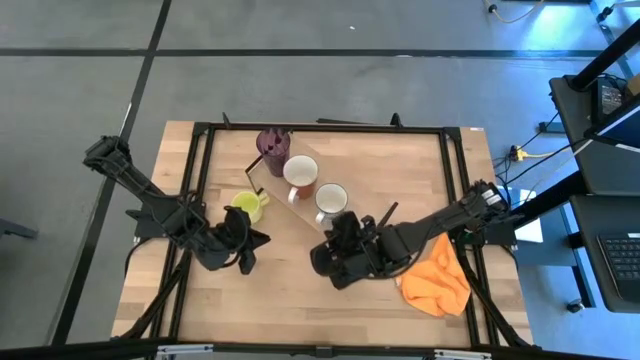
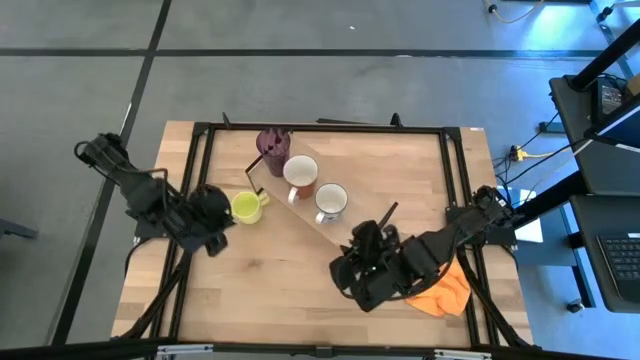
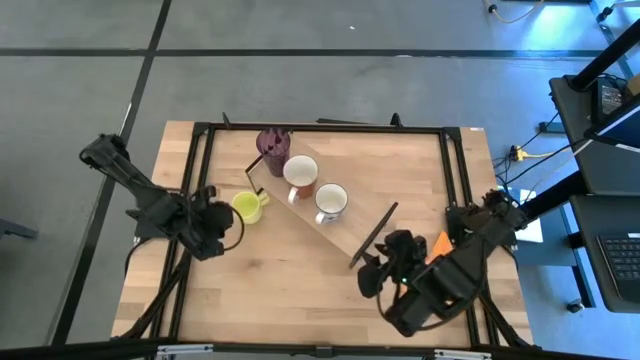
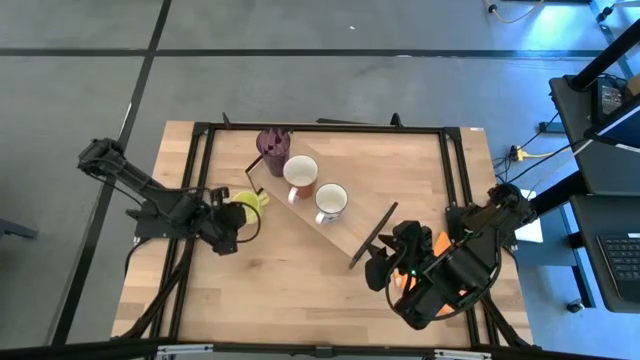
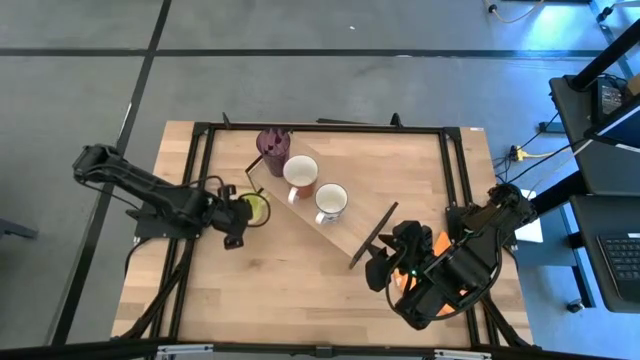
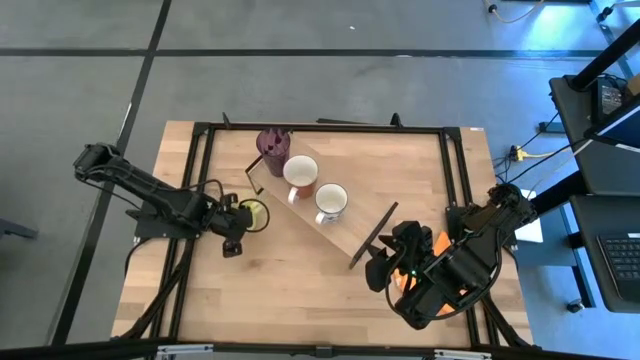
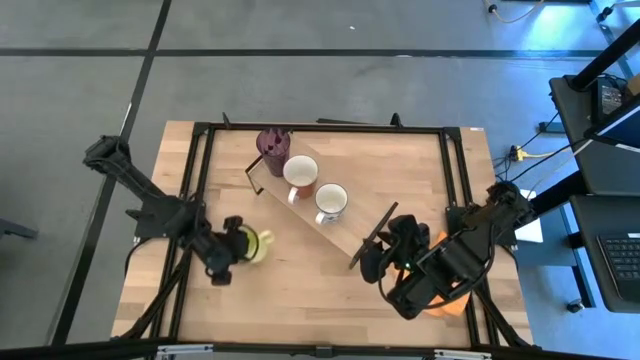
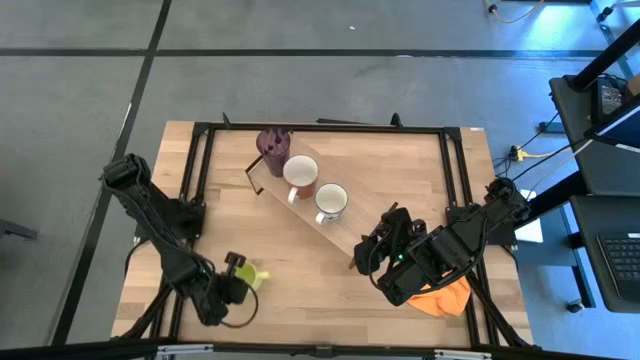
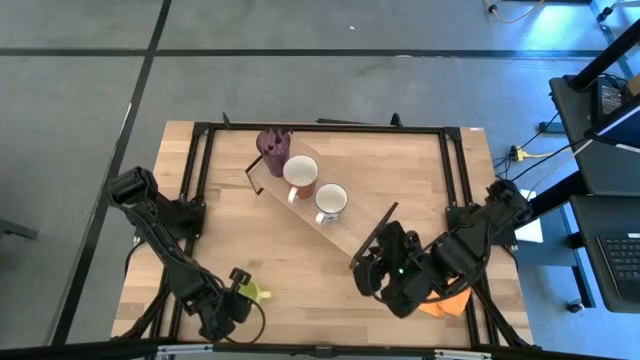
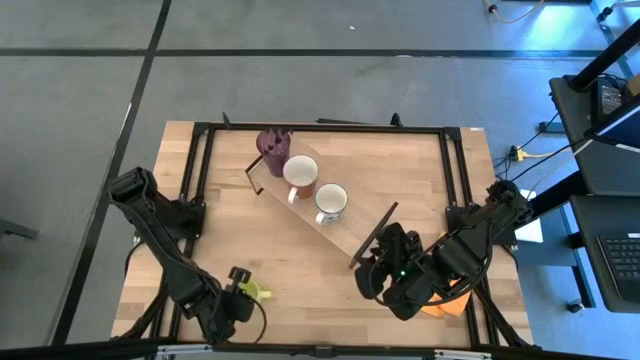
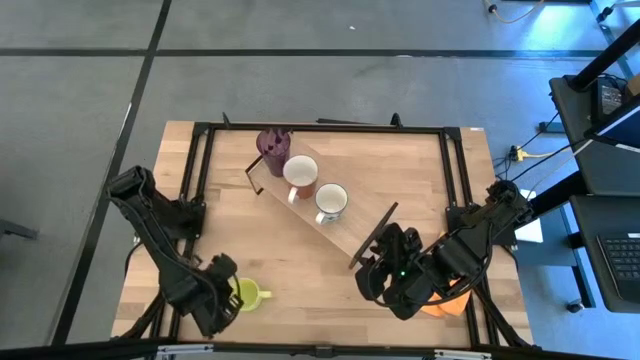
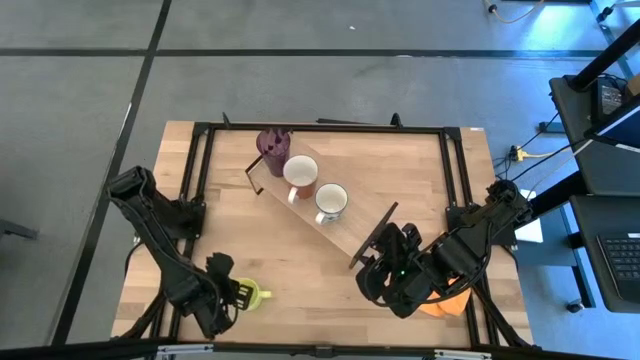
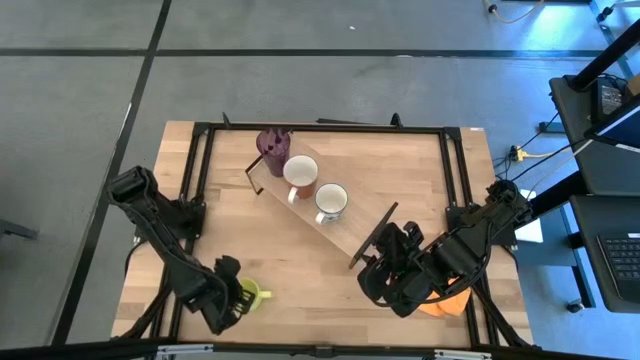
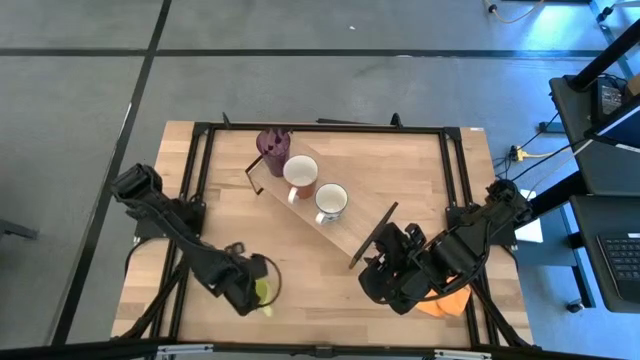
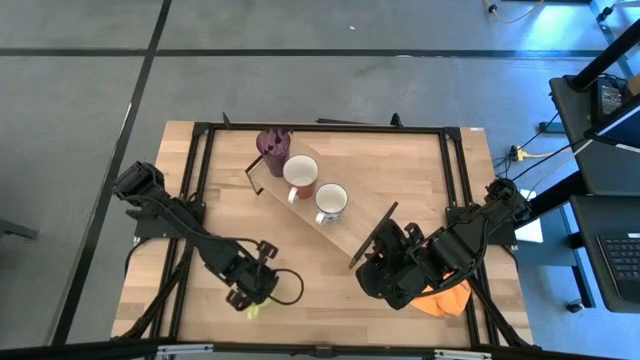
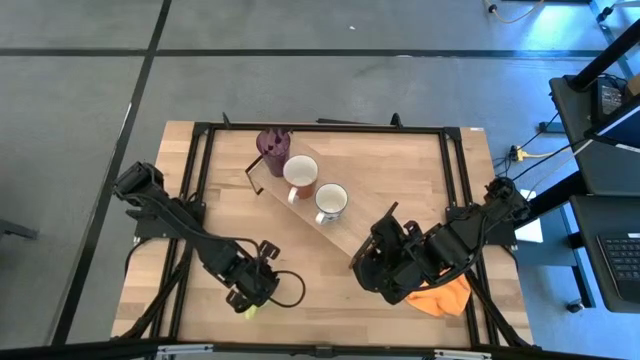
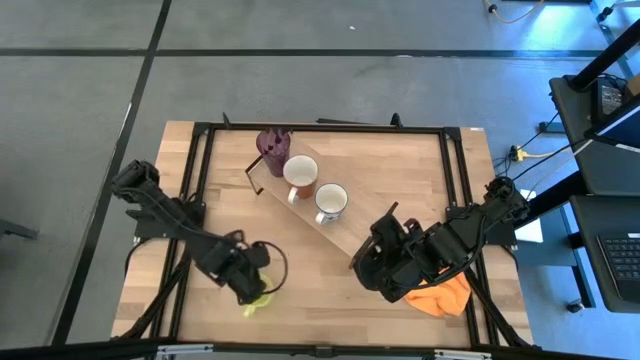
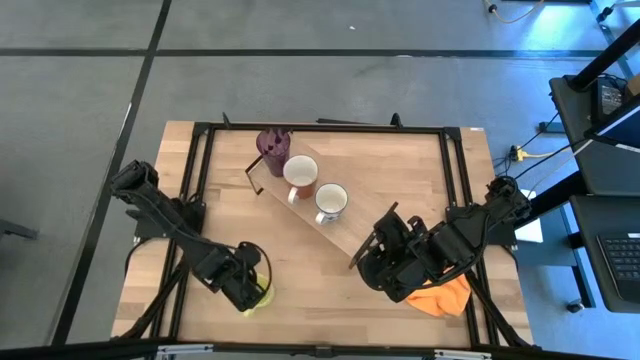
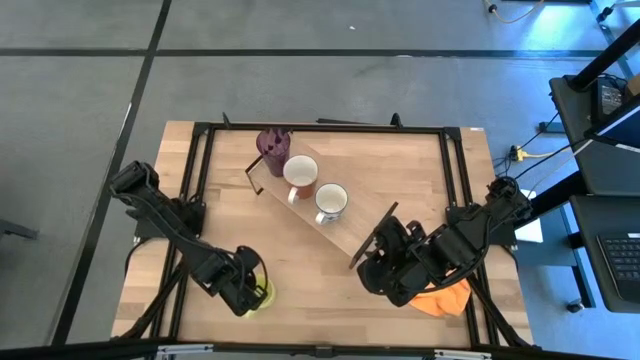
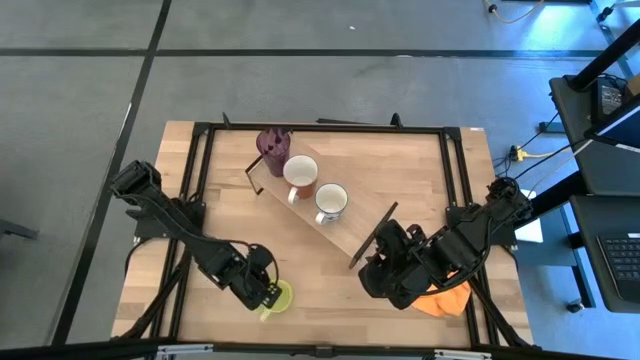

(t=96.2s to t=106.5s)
Task: Stack small to large cups/mugs on shelf
Put the yellow mug on the shelf

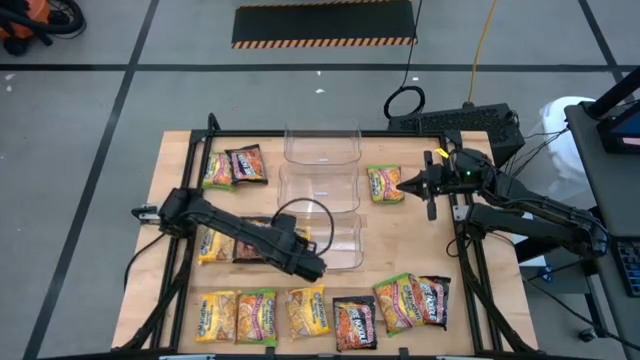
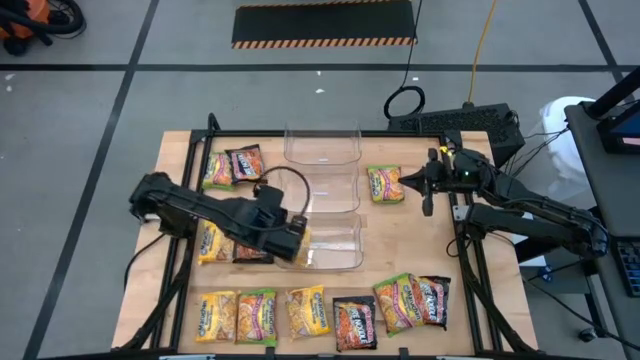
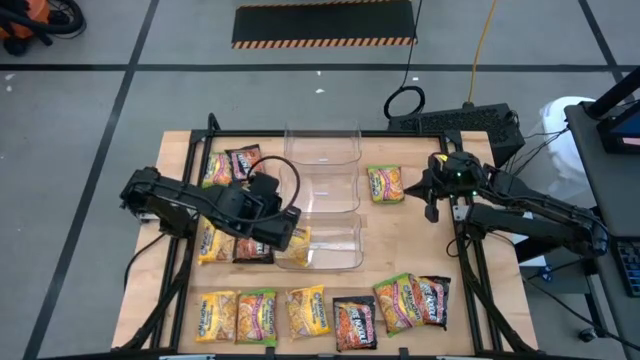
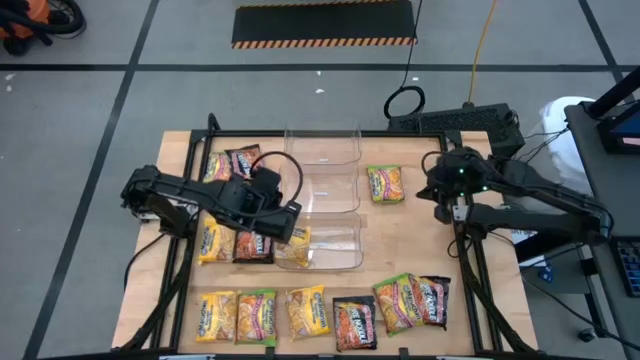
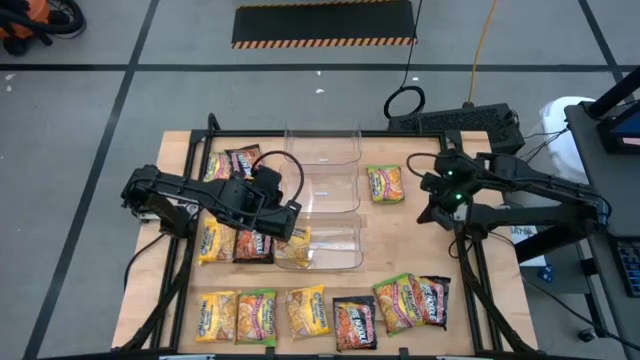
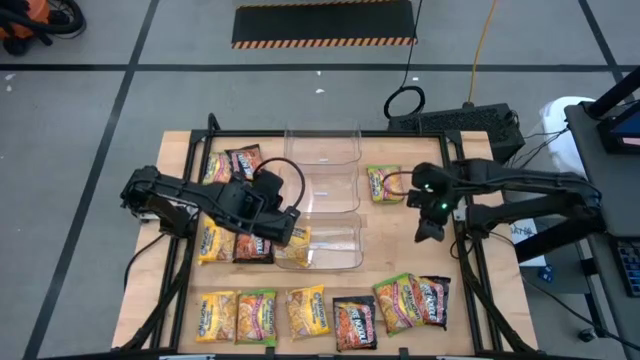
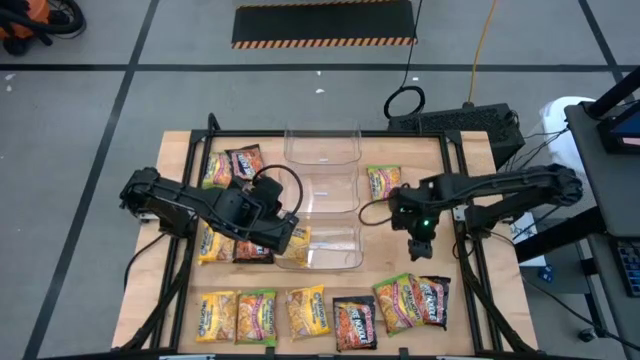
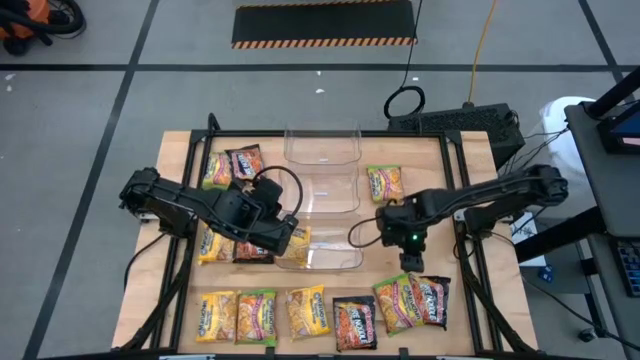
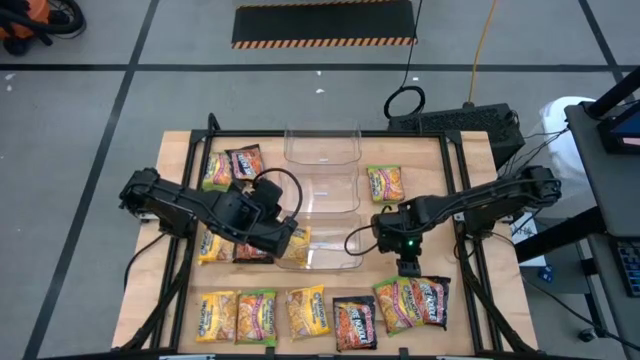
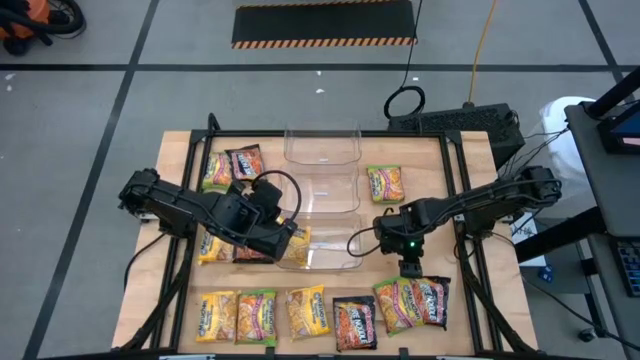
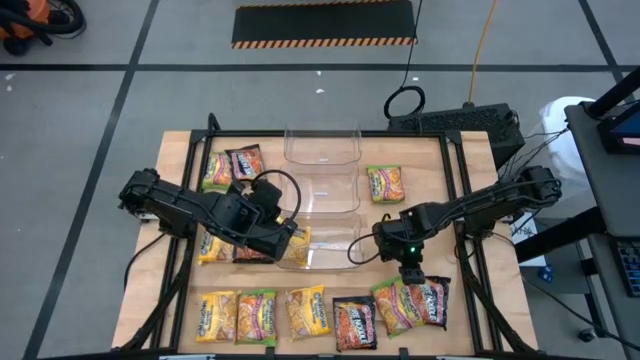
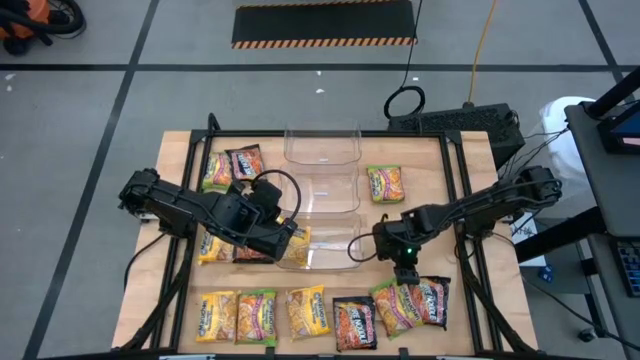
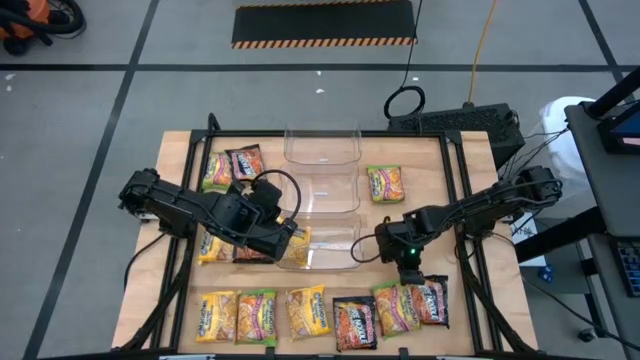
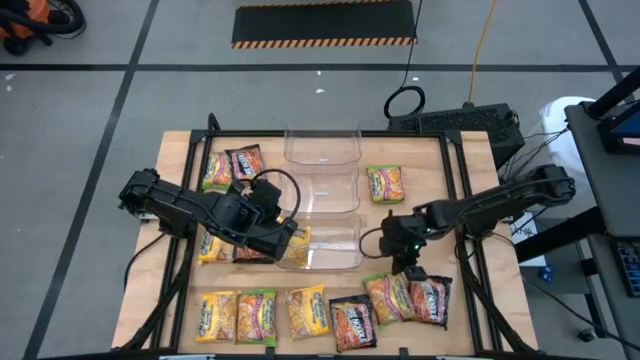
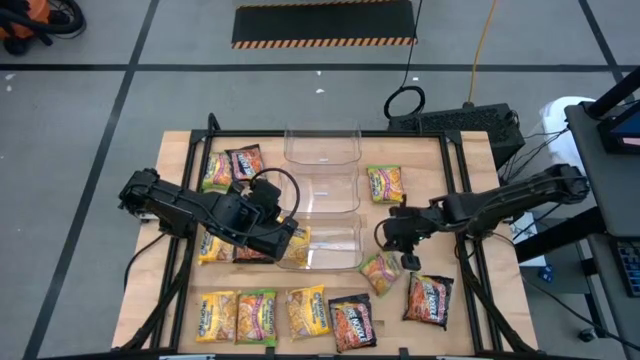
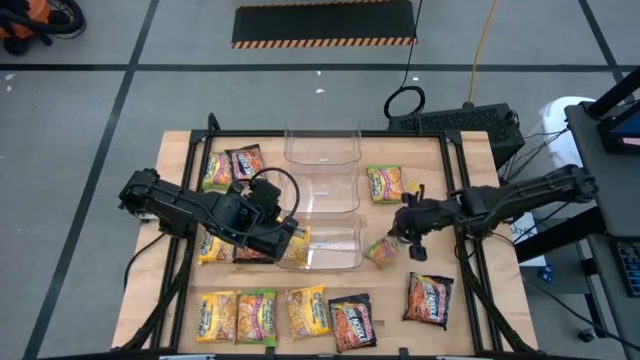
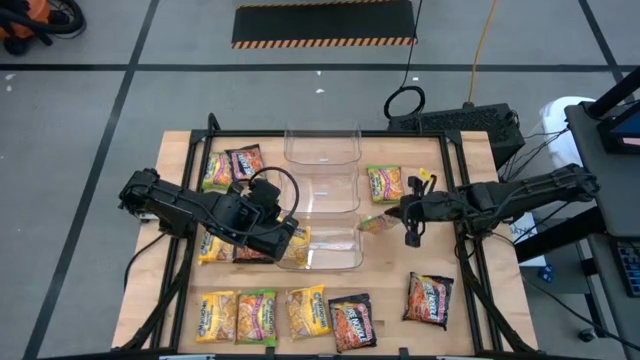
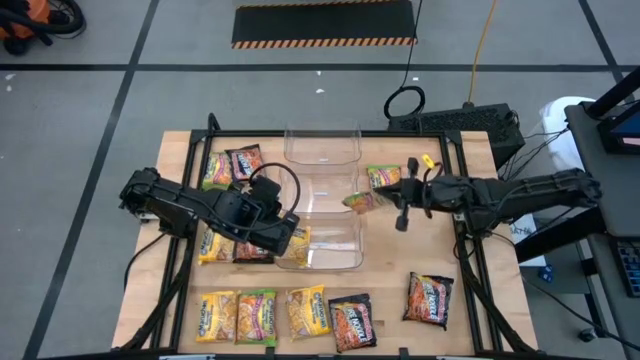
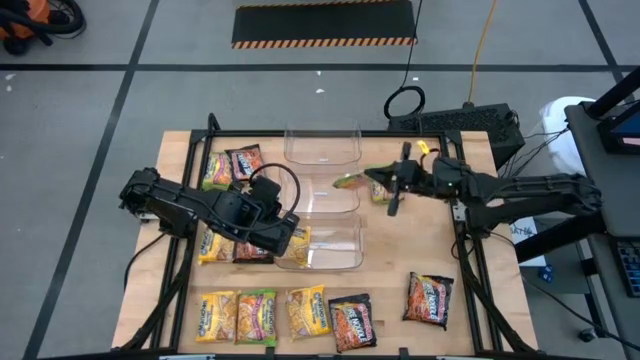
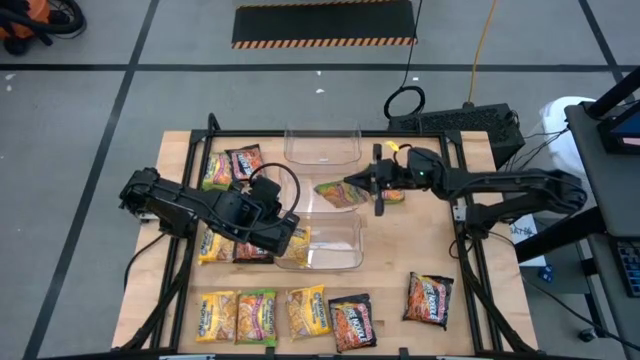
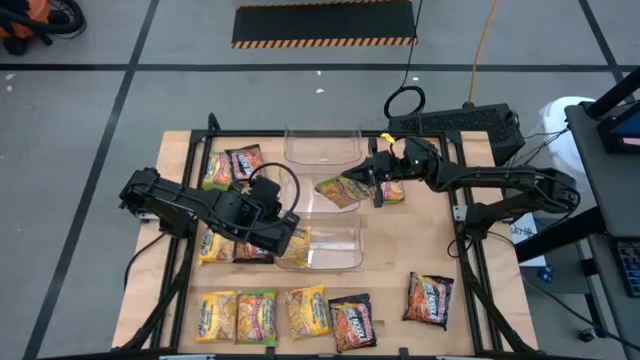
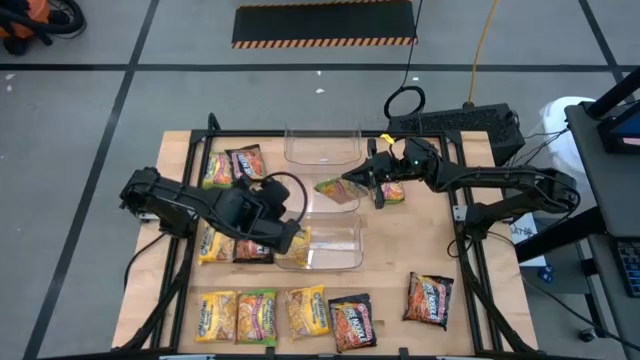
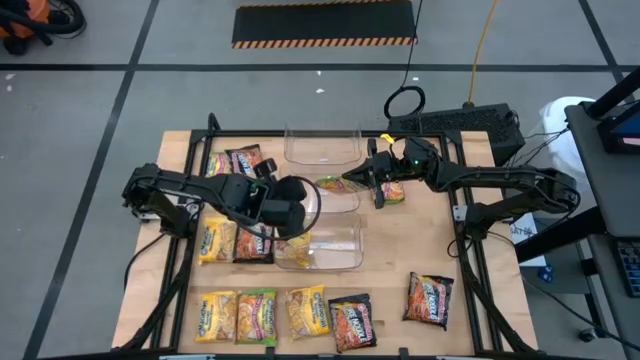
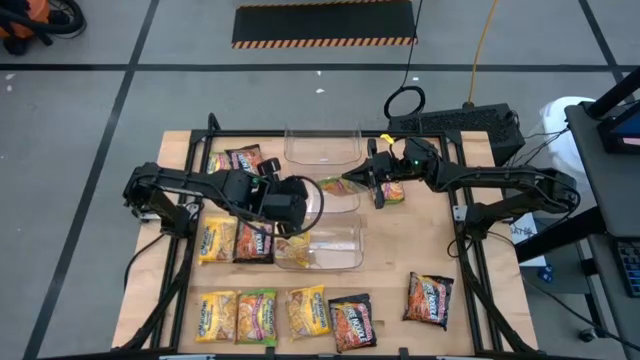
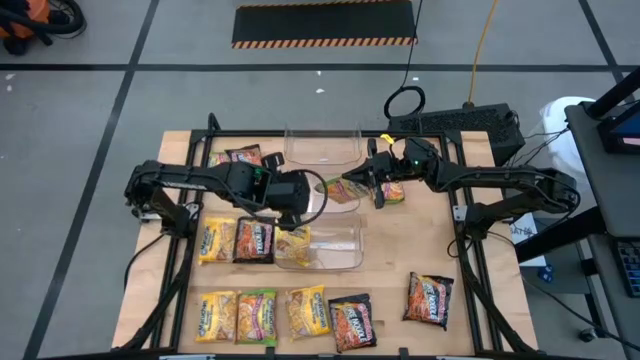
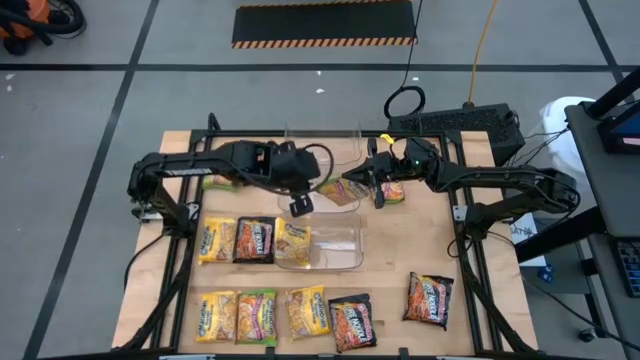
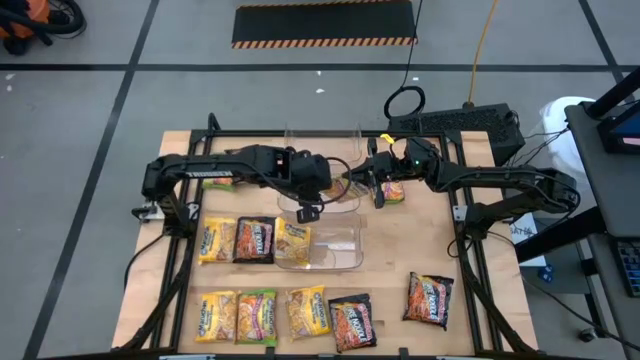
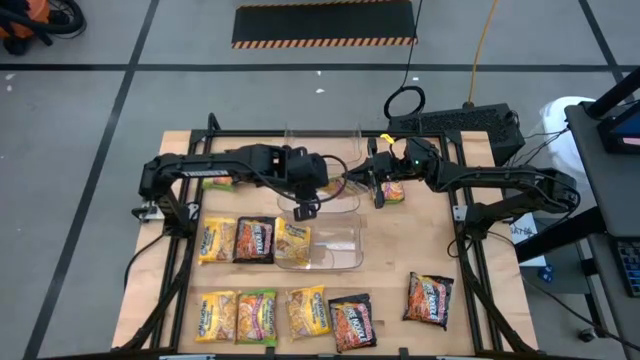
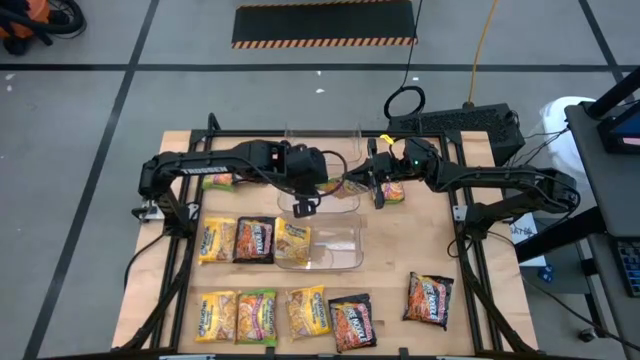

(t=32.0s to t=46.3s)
Task: Sort Maruchan noodles
Put the green noodle pack into the center transparent bin
